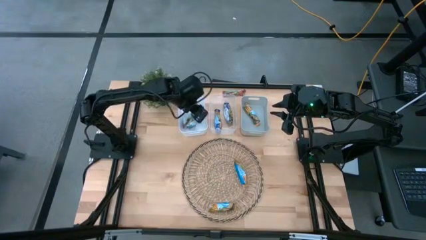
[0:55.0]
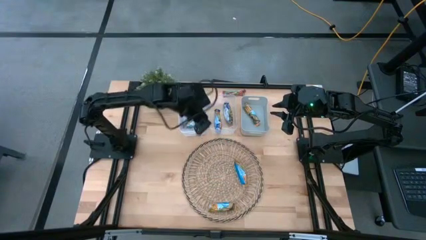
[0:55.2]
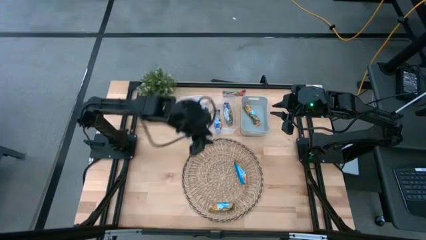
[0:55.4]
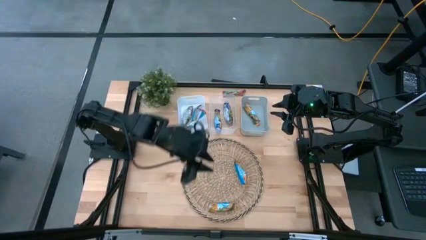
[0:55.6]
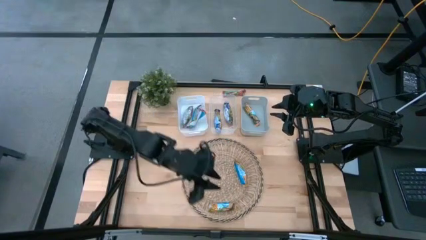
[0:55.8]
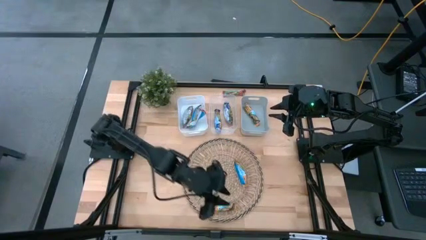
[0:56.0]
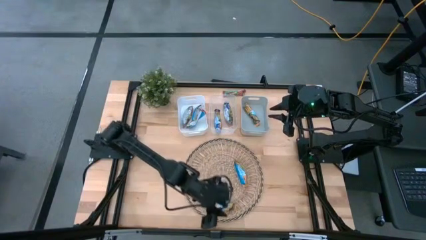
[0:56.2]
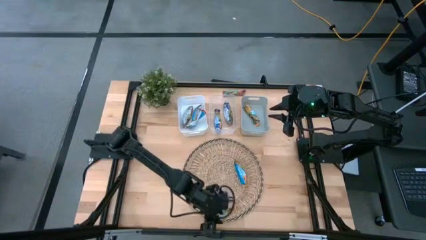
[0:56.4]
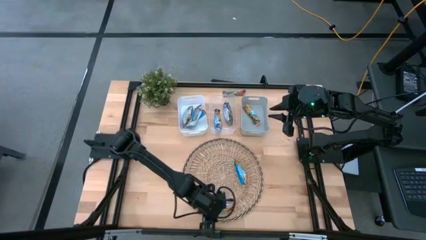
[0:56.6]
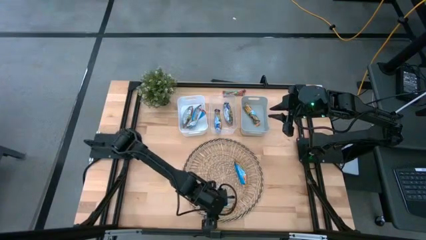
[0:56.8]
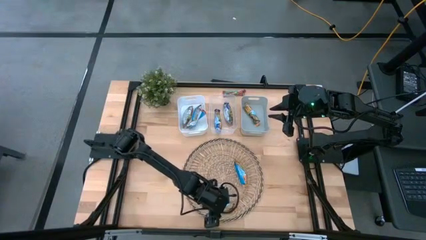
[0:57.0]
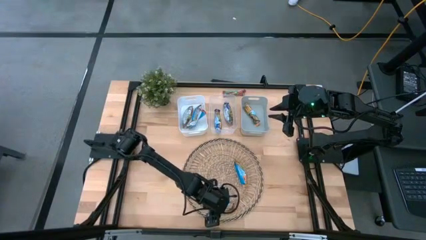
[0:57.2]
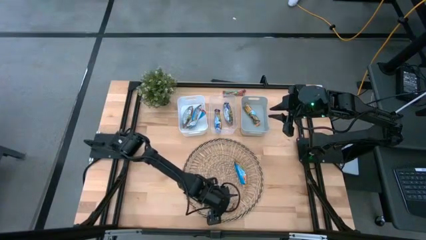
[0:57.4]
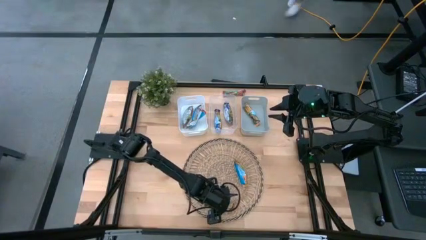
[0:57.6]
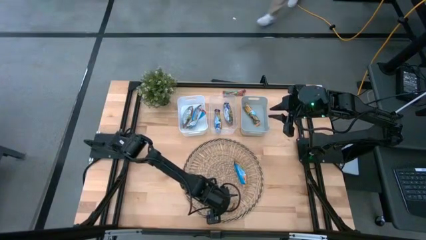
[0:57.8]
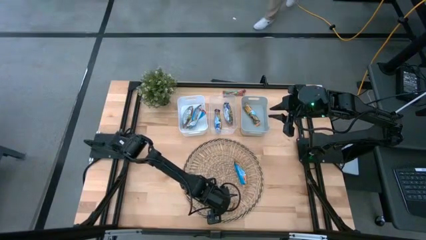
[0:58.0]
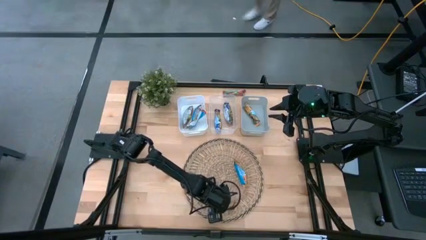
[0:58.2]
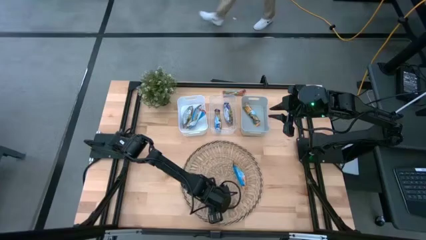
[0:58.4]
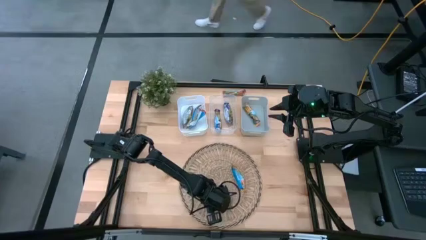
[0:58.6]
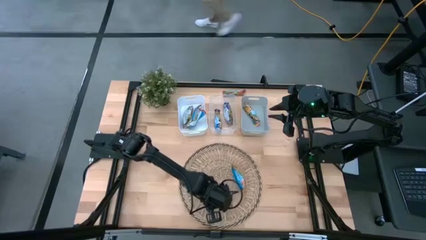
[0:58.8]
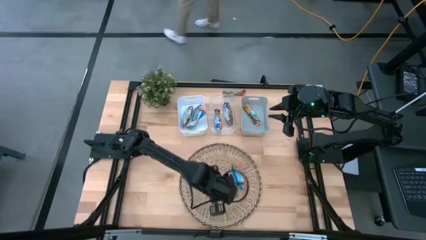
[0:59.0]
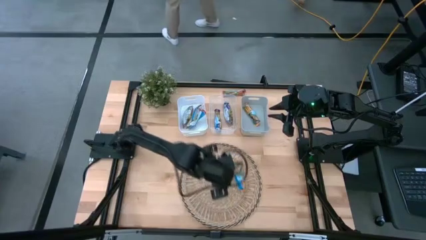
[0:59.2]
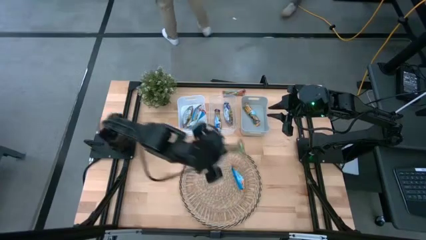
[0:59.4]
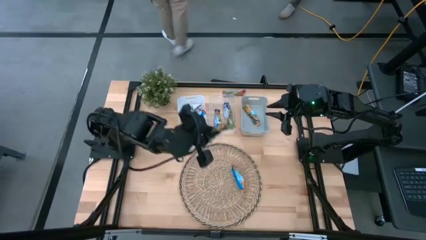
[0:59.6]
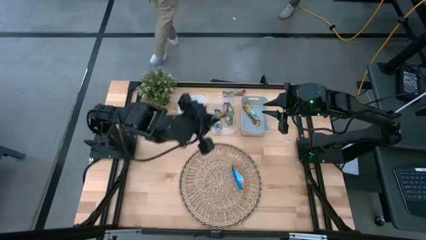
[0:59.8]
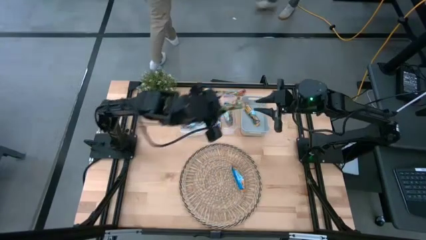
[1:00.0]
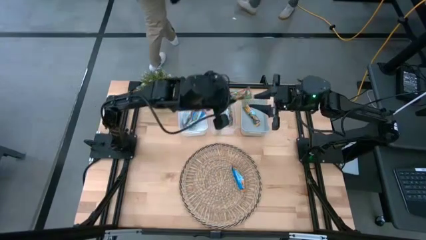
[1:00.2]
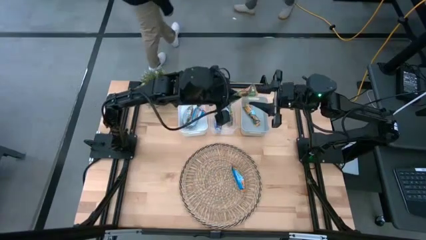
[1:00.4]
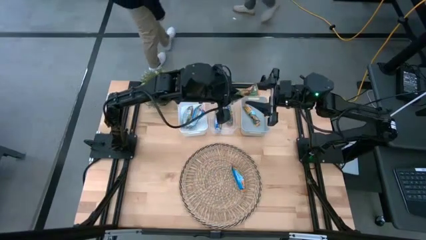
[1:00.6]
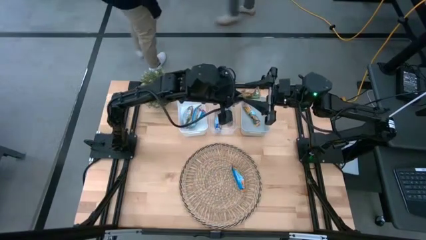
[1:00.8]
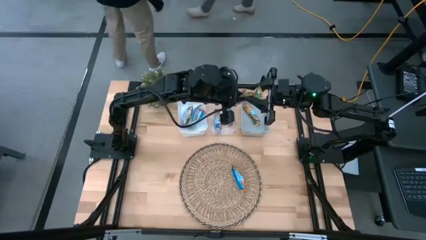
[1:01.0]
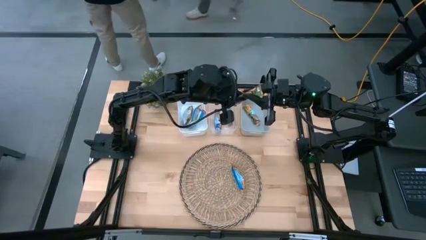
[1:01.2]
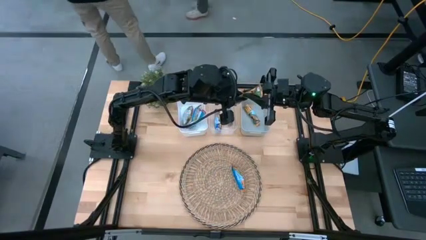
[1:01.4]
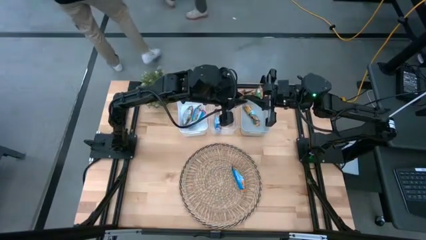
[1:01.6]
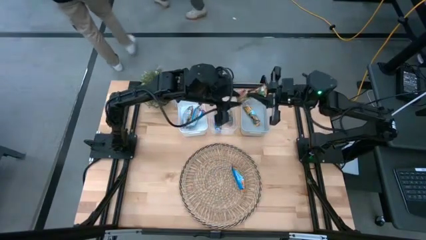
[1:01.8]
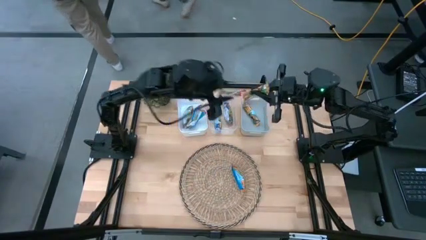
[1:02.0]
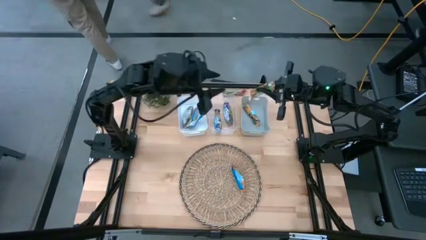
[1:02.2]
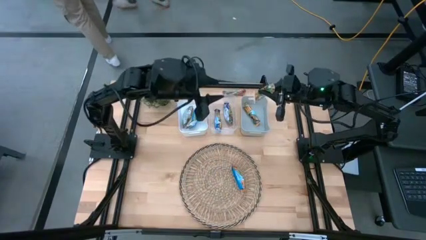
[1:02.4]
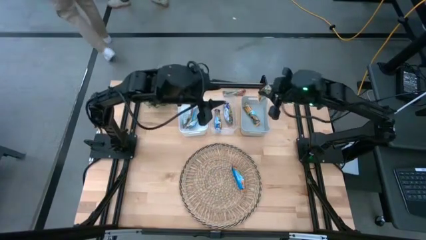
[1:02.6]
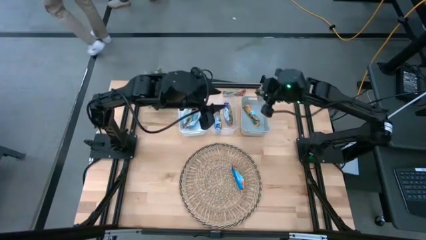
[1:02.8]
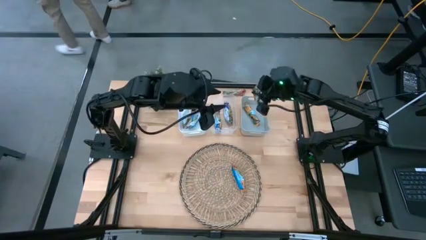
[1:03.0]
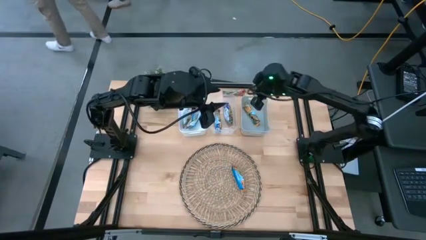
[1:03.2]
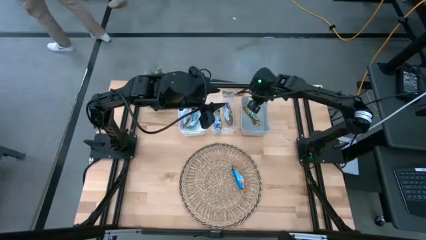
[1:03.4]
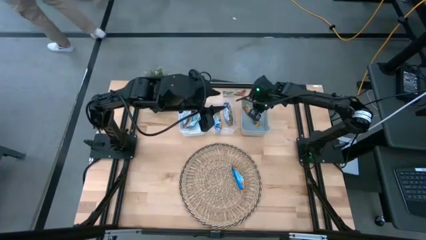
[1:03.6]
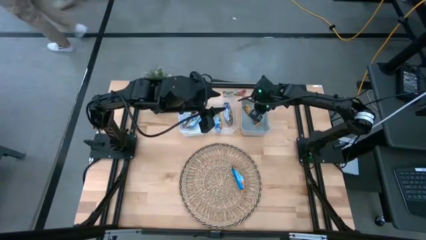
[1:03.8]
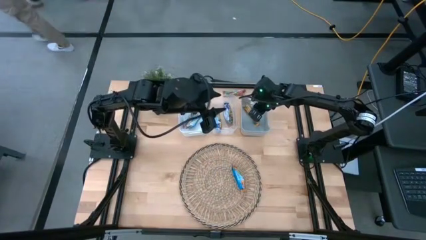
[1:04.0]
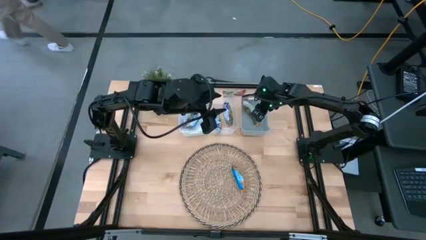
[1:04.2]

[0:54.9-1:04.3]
Task: Pick and place Granola Bars by type
Put the bottom yellow granola bar into the gray bin

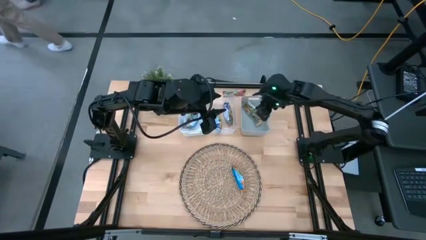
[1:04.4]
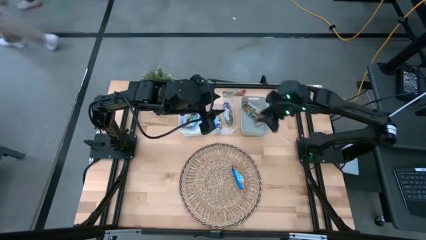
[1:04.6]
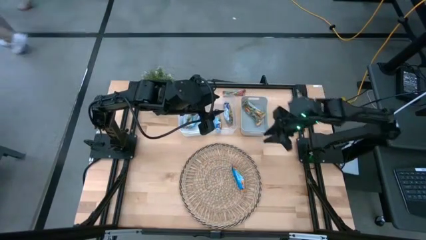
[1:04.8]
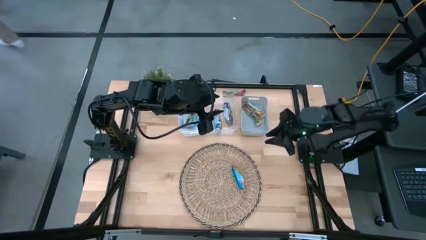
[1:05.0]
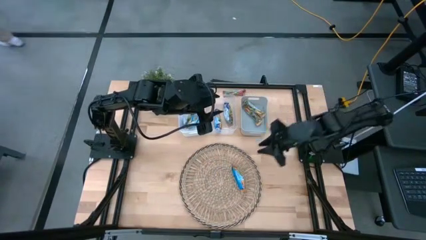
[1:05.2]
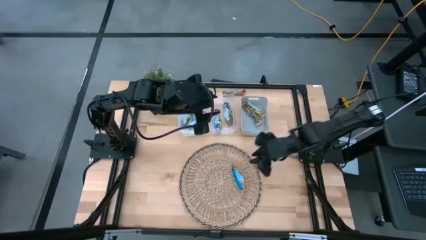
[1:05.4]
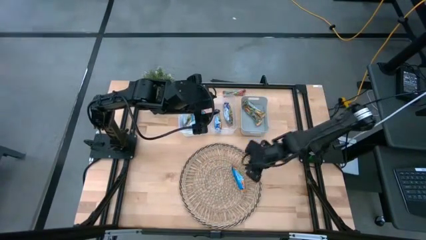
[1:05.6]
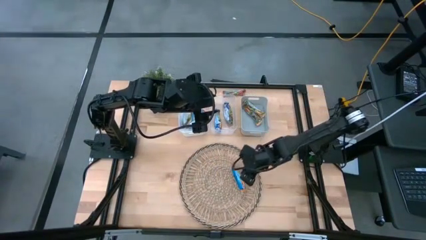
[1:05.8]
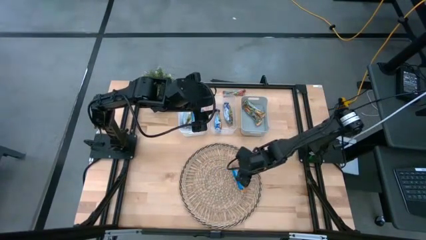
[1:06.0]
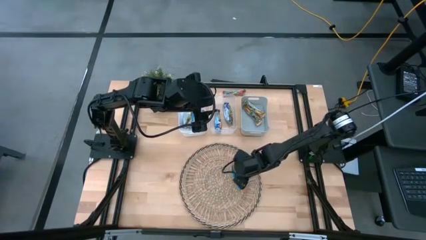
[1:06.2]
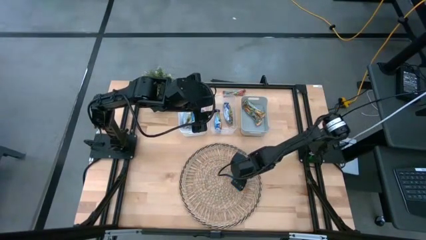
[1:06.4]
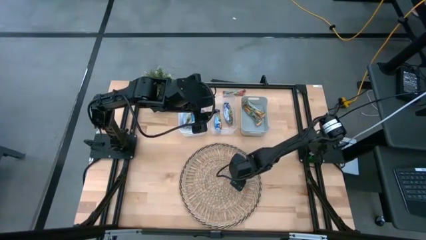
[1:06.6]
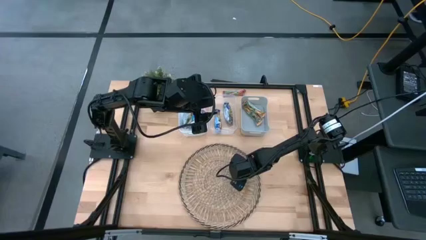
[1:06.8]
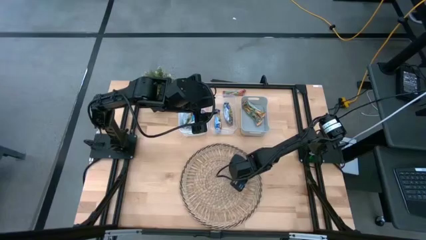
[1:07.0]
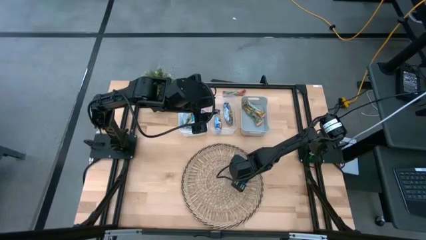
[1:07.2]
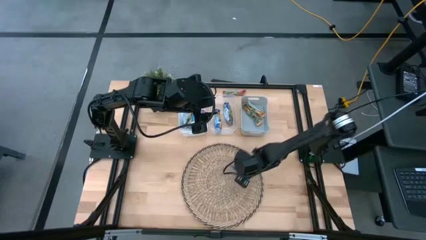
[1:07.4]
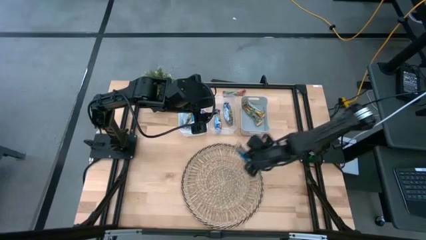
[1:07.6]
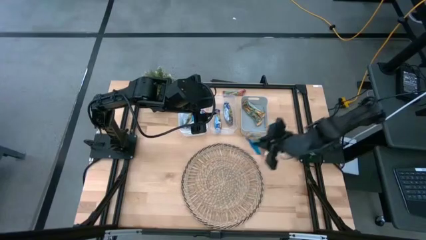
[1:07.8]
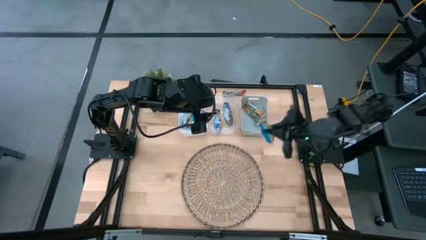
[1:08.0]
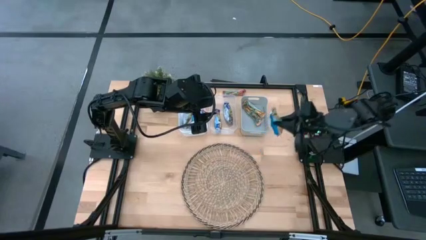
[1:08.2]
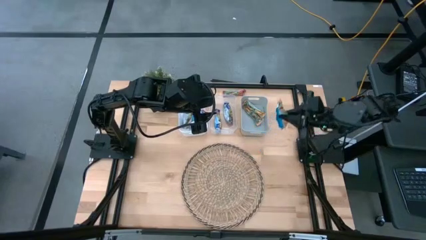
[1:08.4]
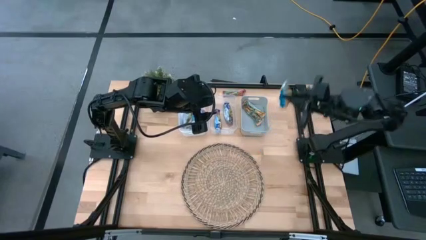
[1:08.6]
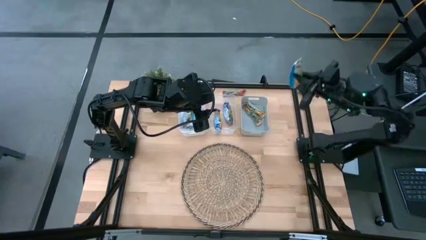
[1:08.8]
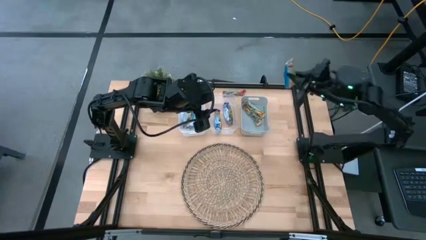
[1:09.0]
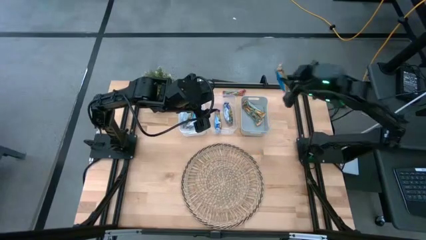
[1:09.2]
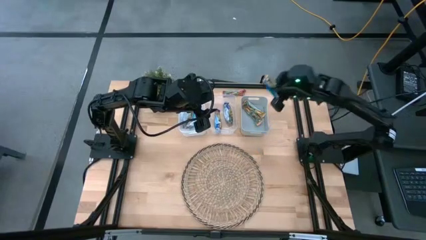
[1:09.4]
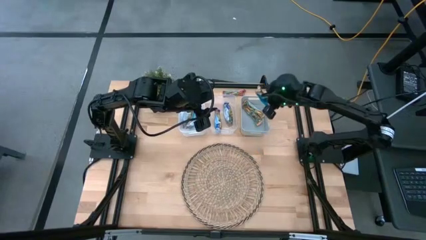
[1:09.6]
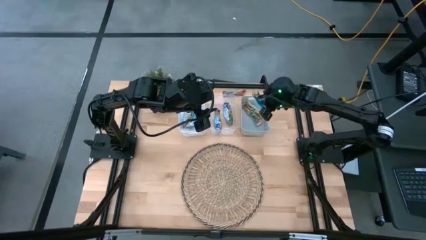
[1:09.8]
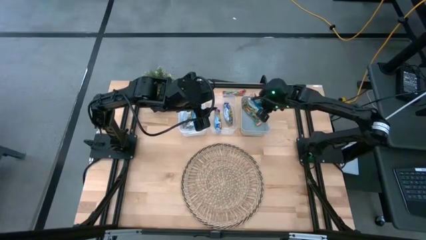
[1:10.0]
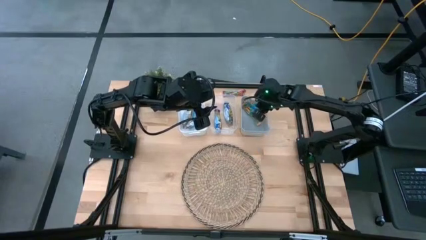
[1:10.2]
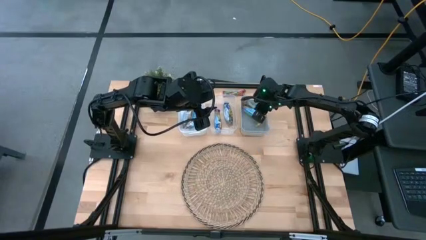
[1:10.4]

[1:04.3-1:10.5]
Put the yellow granola bar into the gray bin
